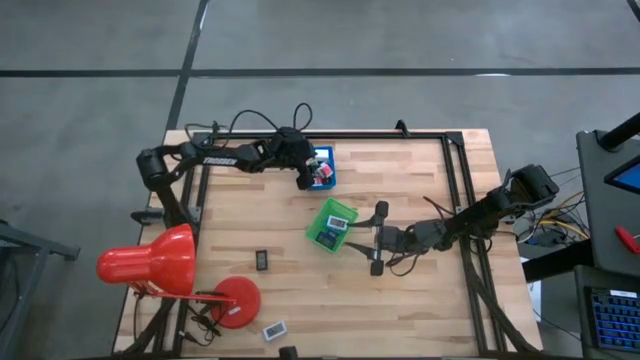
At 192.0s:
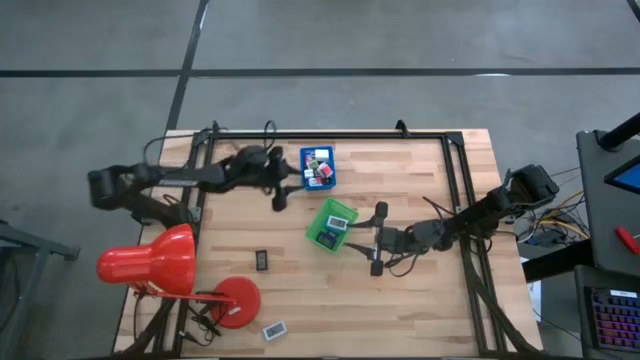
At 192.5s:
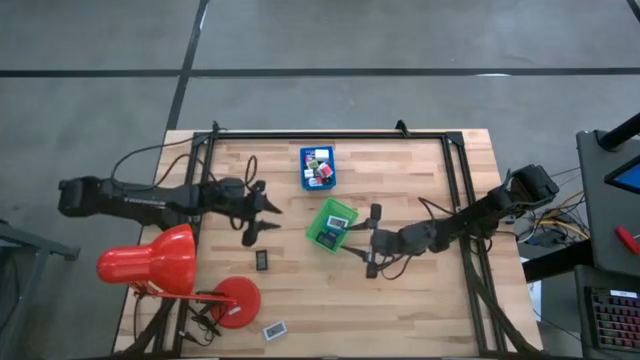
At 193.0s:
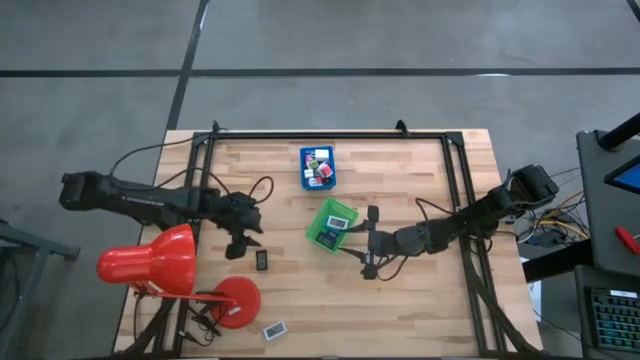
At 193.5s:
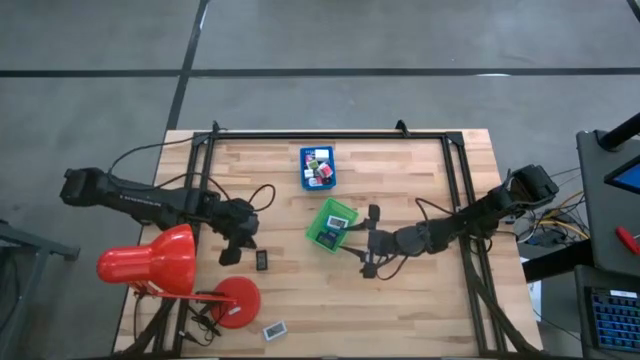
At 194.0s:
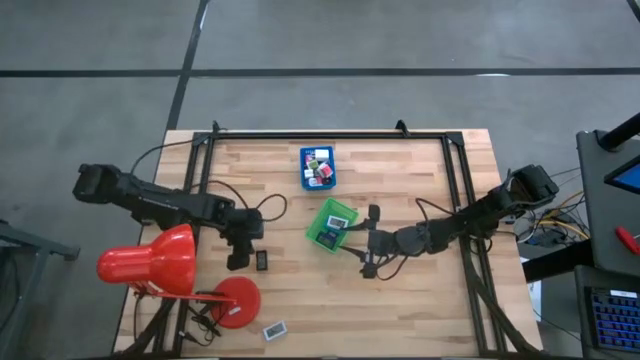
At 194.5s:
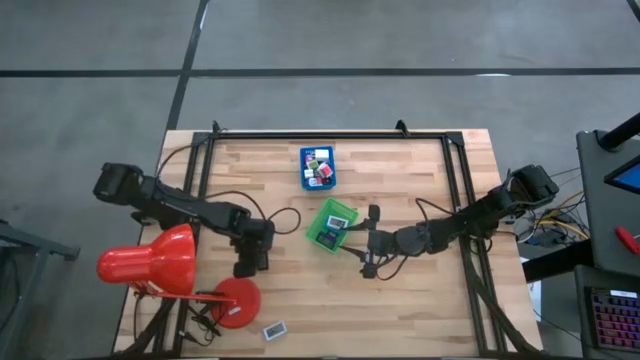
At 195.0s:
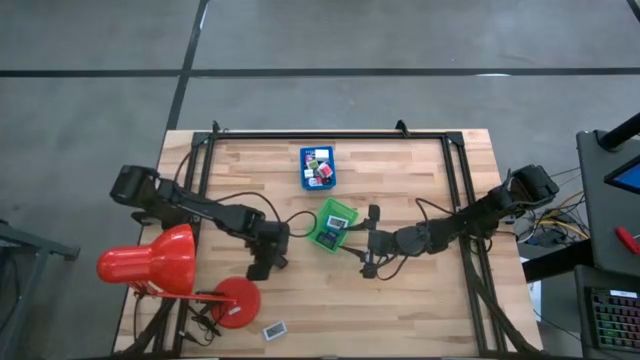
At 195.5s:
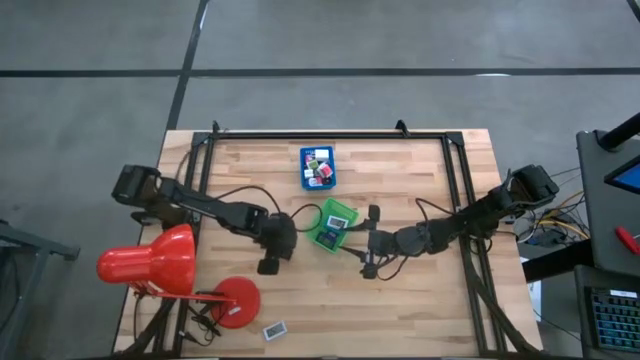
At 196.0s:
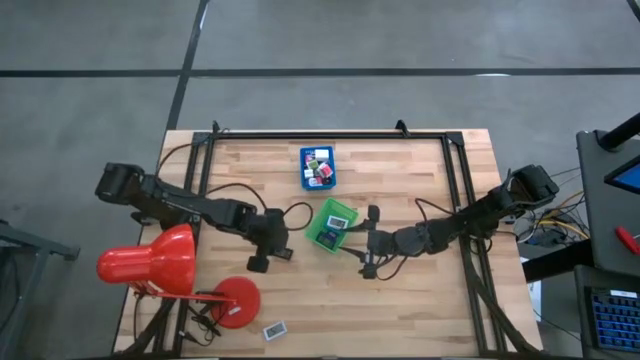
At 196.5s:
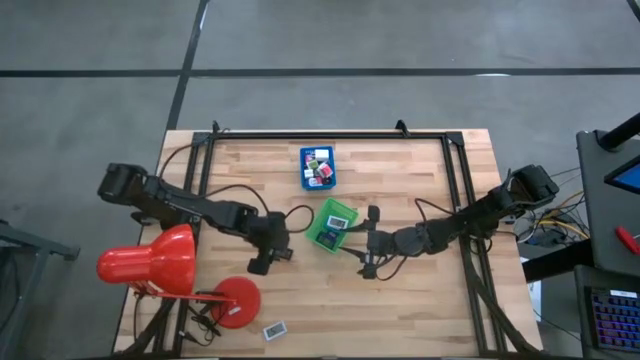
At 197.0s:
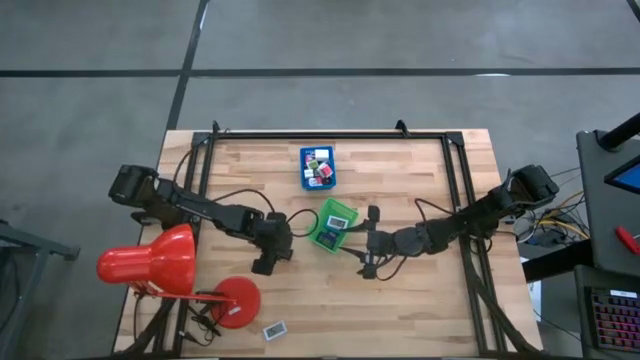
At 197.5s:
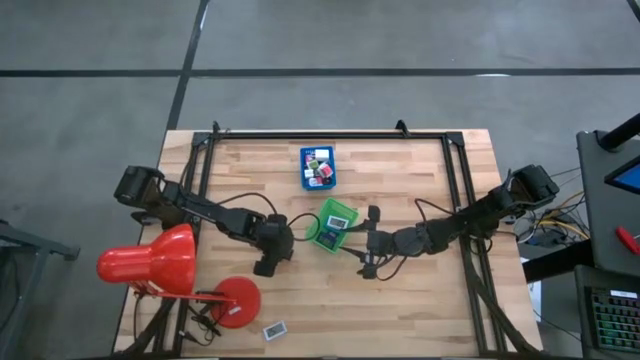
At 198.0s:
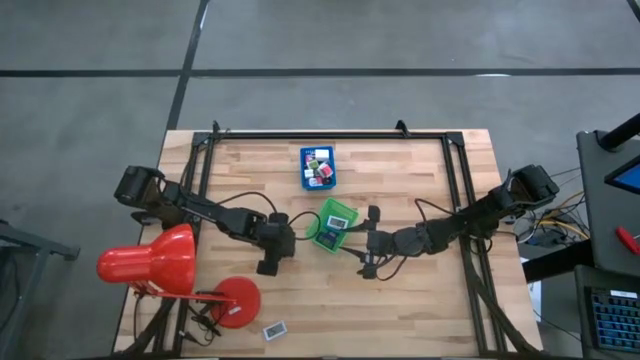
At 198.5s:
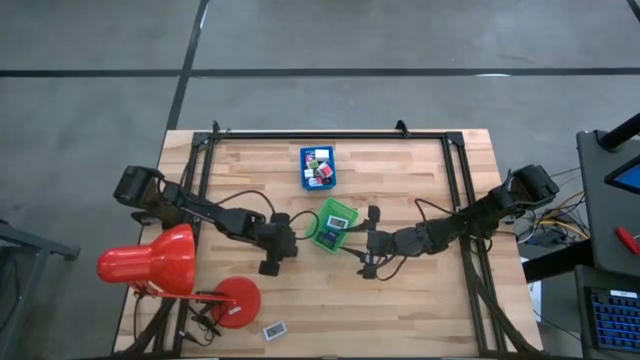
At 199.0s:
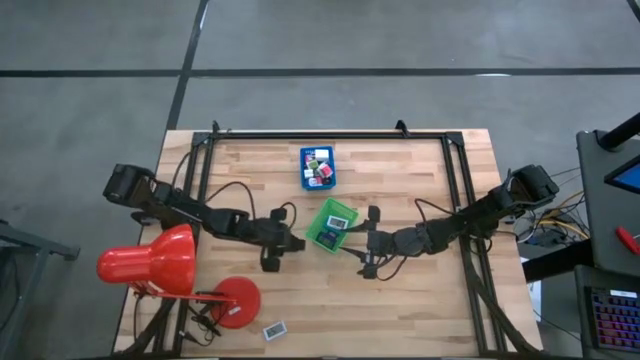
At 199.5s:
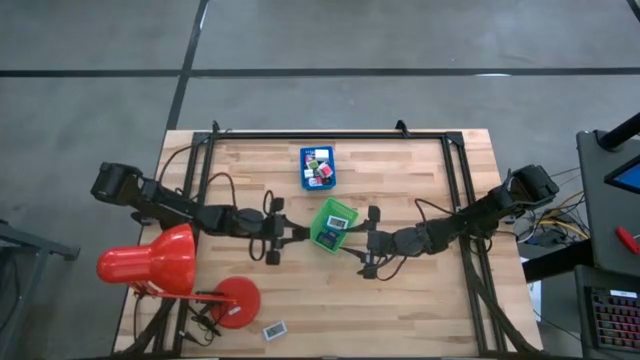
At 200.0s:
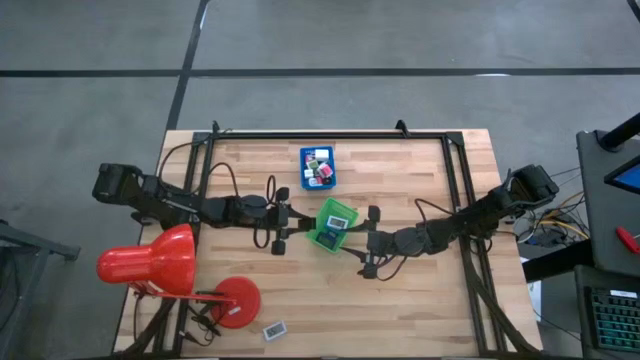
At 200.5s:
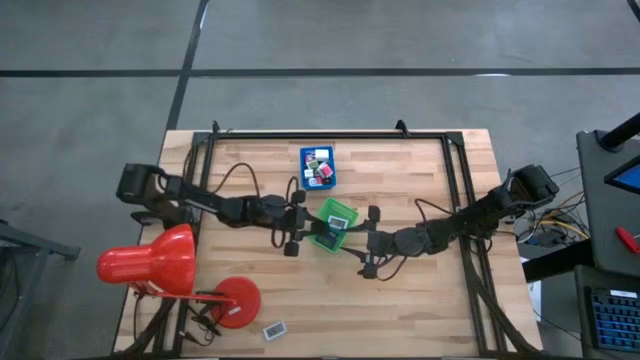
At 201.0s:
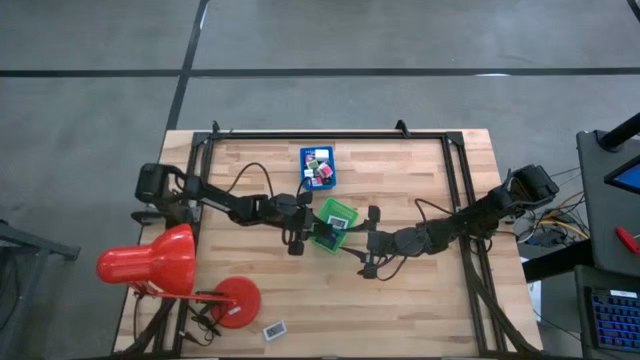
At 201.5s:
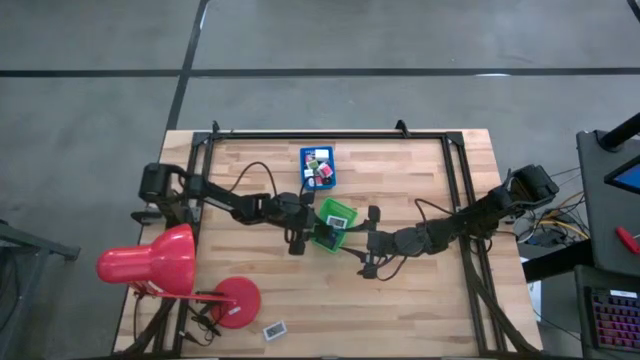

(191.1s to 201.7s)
Task: Pick & Place Office items
Put the black digital clock into the green bin

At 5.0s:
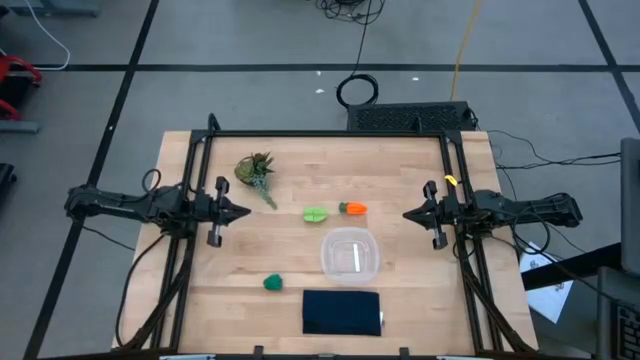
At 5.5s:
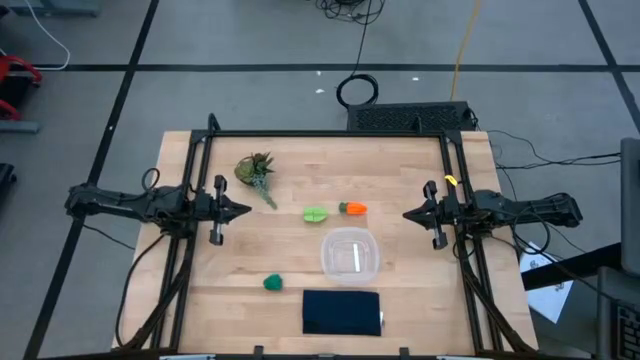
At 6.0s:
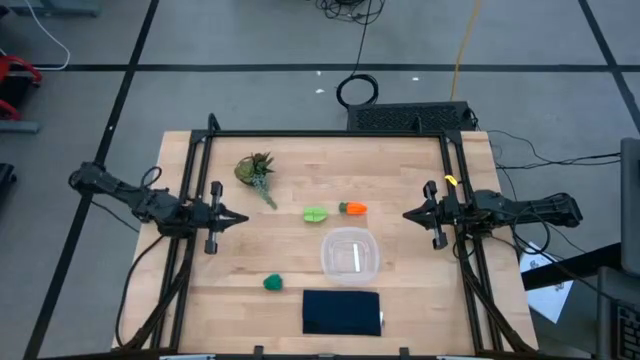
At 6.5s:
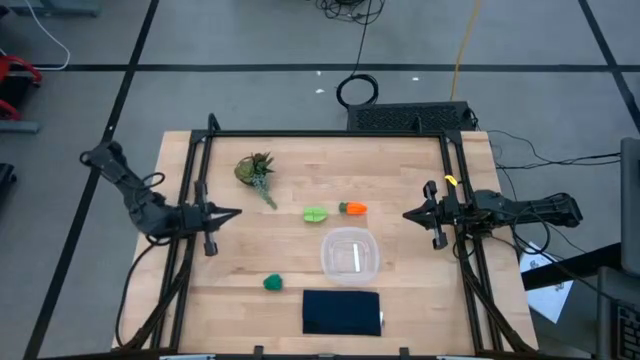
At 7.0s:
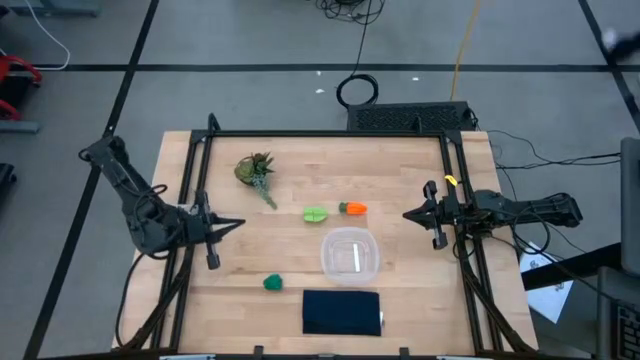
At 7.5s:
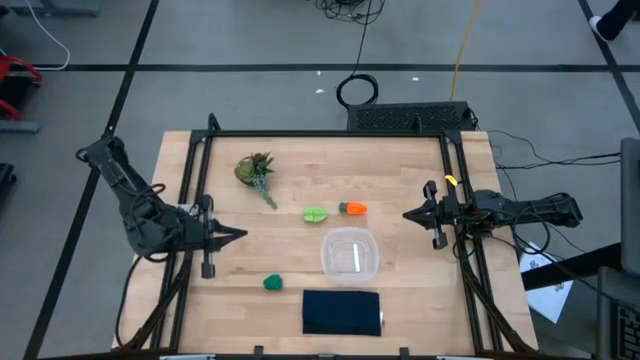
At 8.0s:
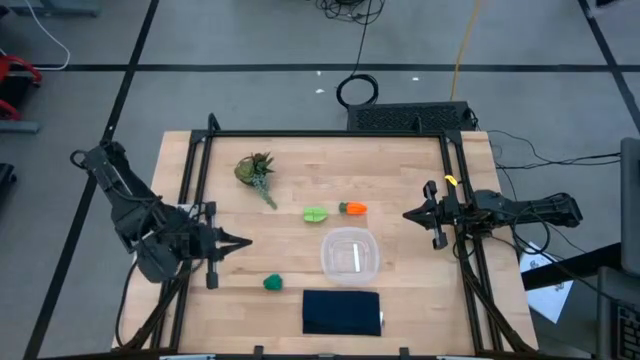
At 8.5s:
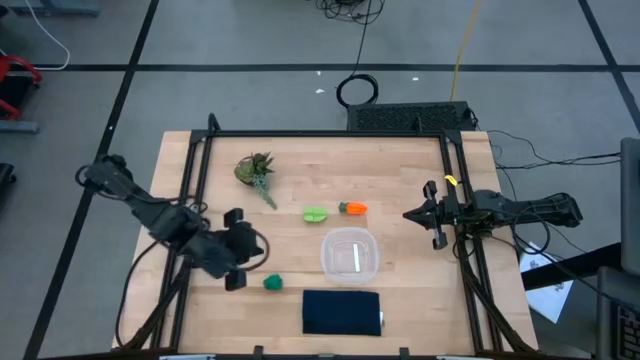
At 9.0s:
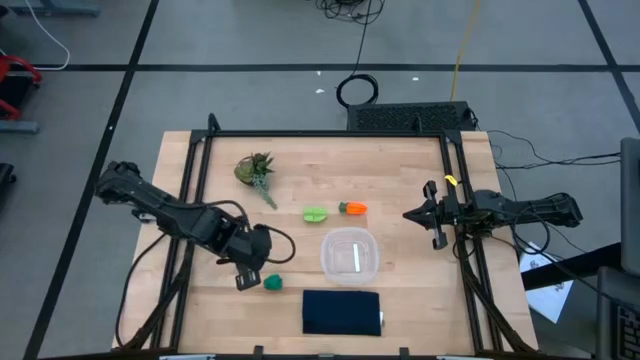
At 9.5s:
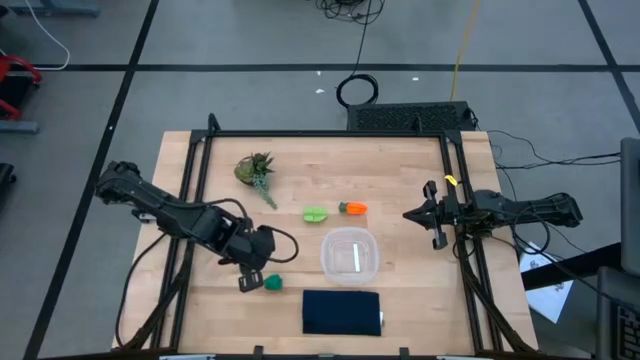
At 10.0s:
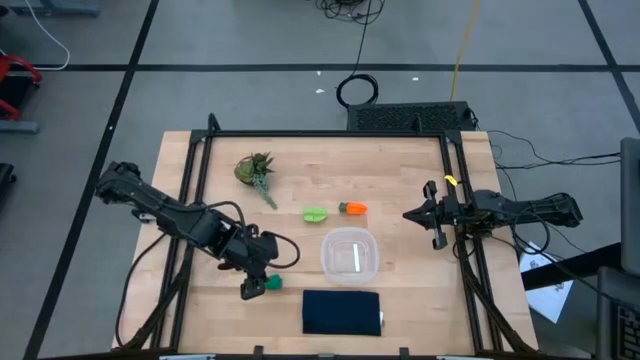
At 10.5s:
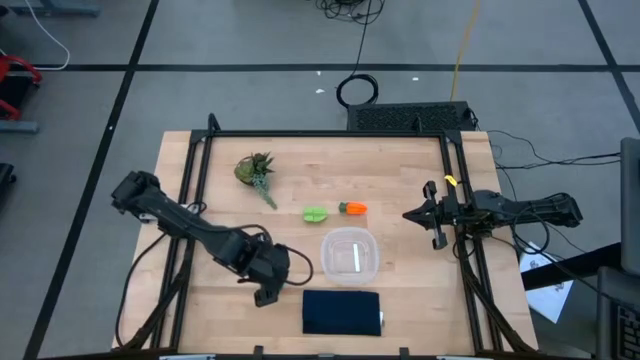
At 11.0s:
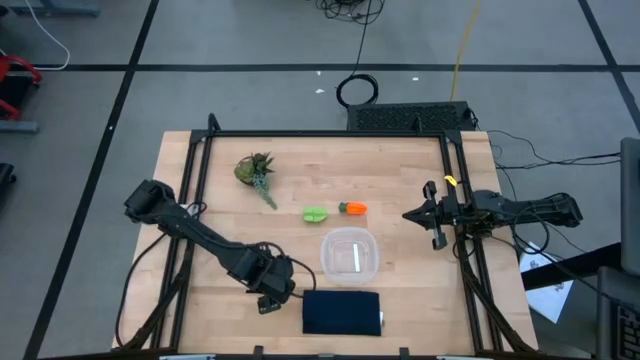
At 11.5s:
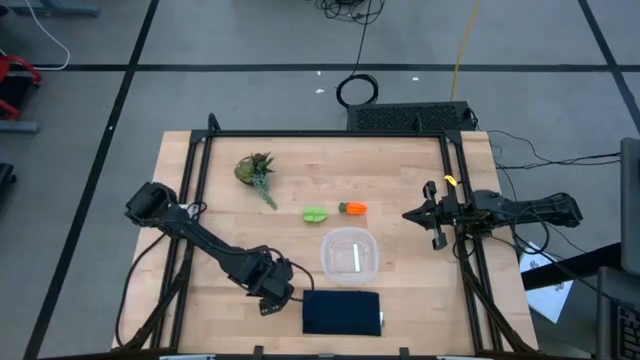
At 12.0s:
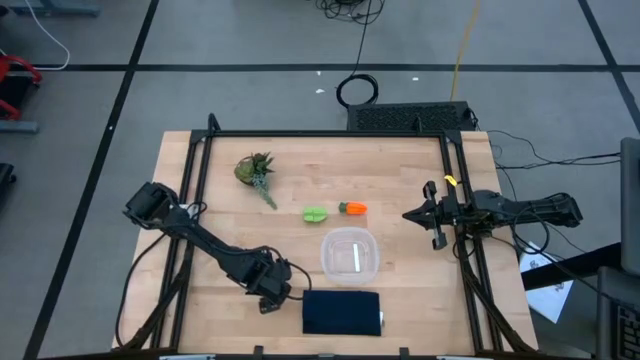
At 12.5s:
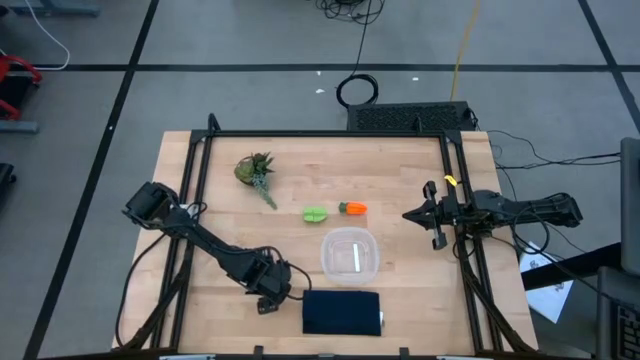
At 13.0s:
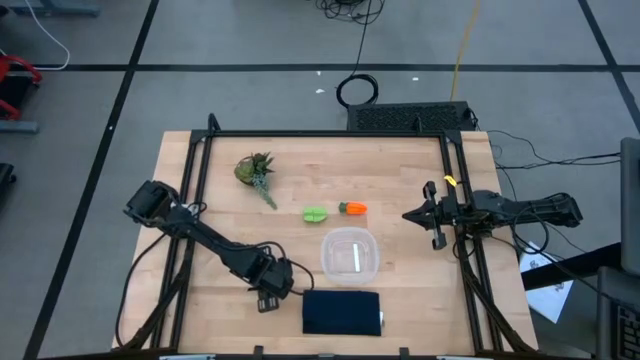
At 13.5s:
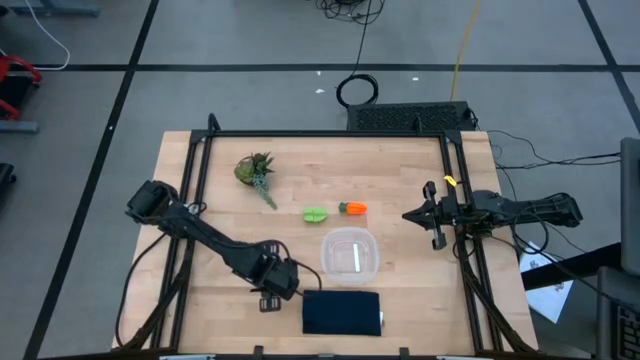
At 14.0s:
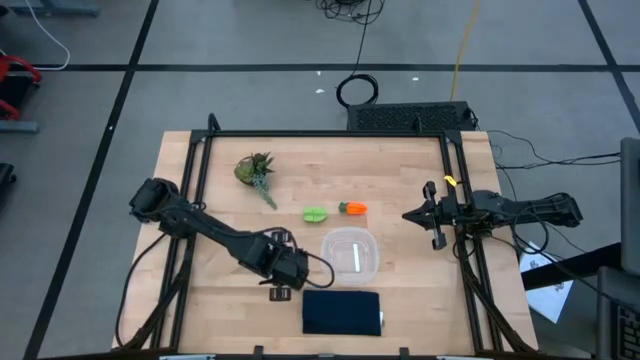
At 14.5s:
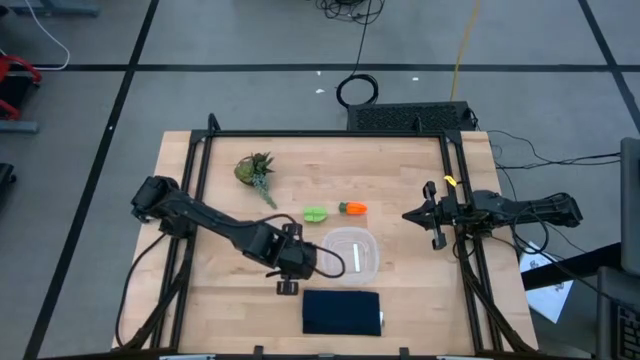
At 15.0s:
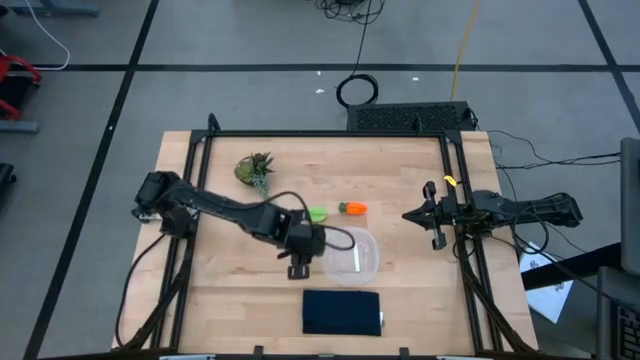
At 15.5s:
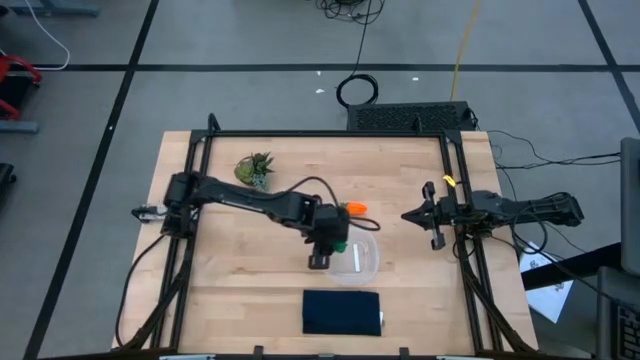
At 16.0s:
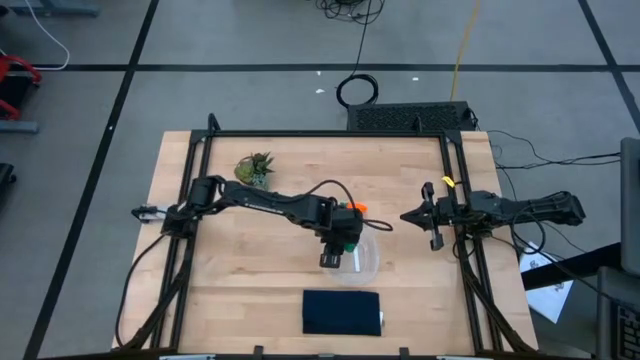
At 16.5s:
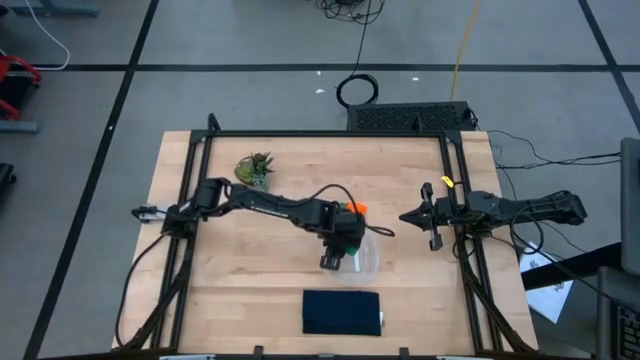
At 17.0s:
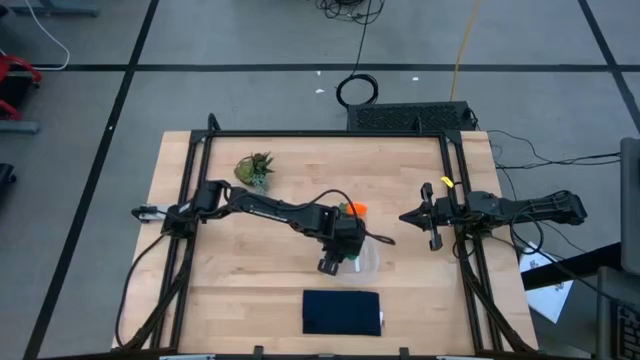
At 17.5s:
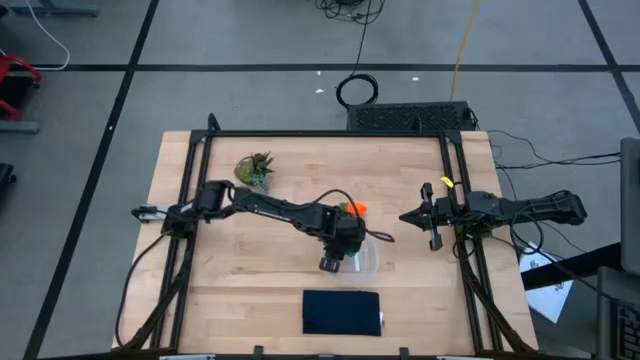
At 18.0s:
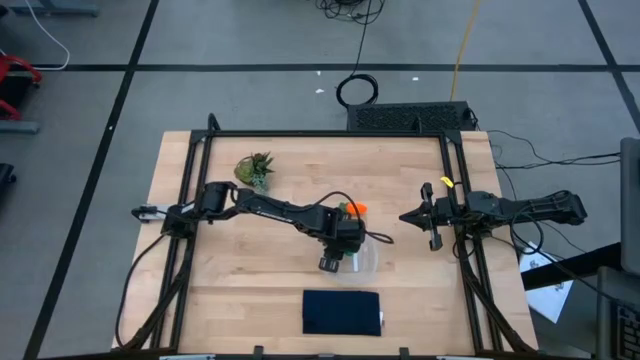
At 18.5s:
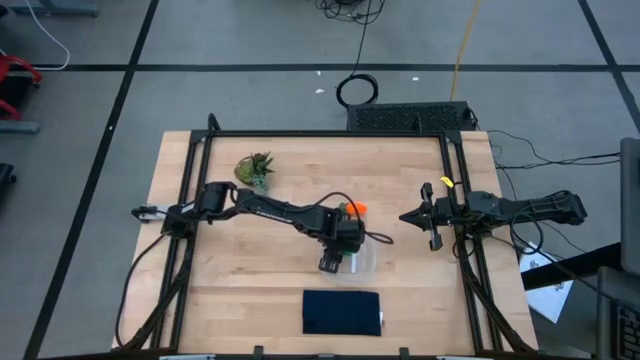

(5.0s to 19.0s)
Task: Pick and placing Produce into tupperware
Put the green bell pepper into the transparent bin
